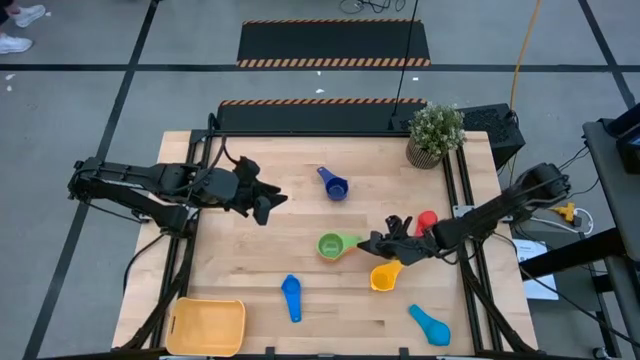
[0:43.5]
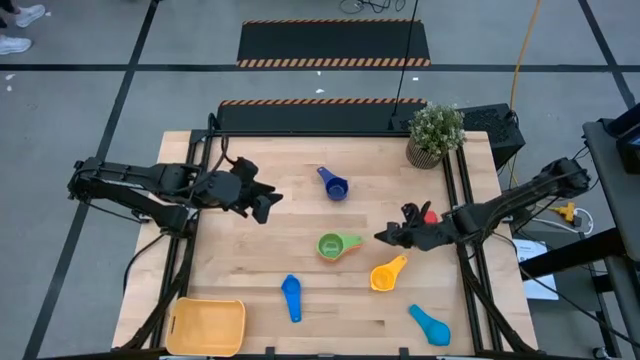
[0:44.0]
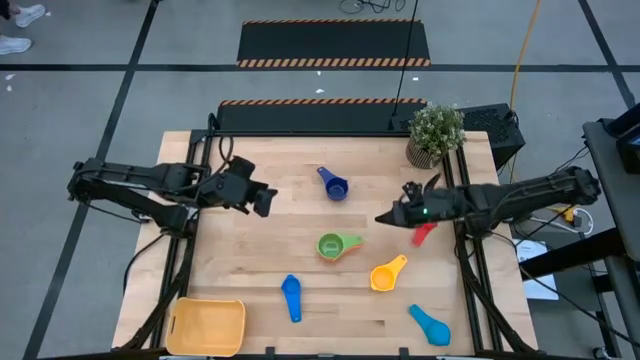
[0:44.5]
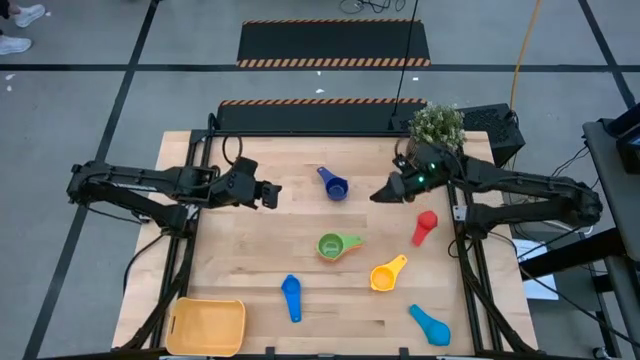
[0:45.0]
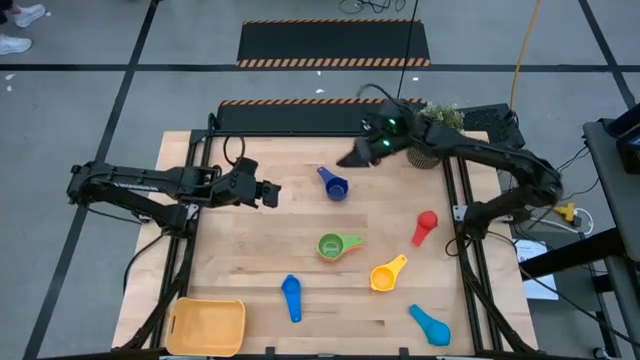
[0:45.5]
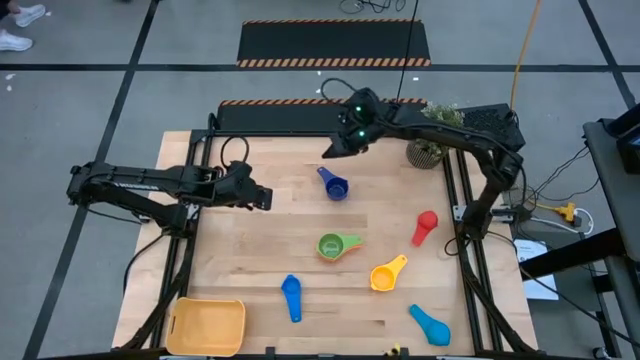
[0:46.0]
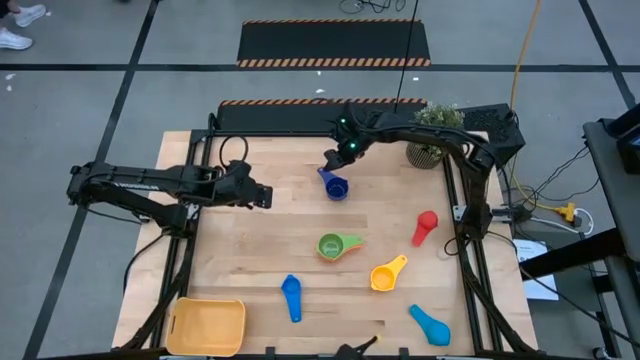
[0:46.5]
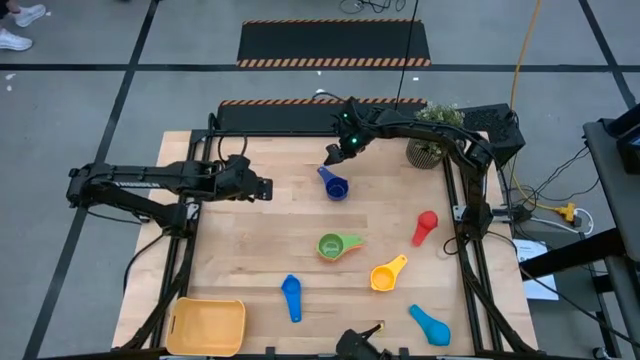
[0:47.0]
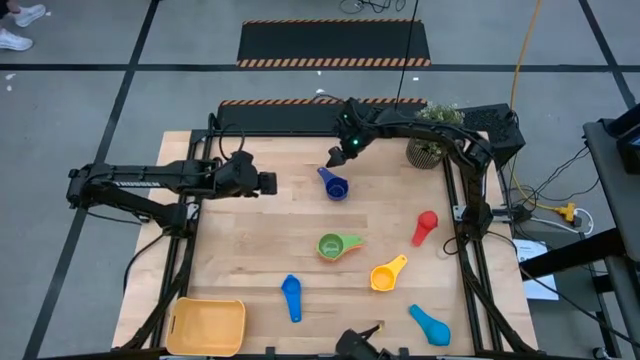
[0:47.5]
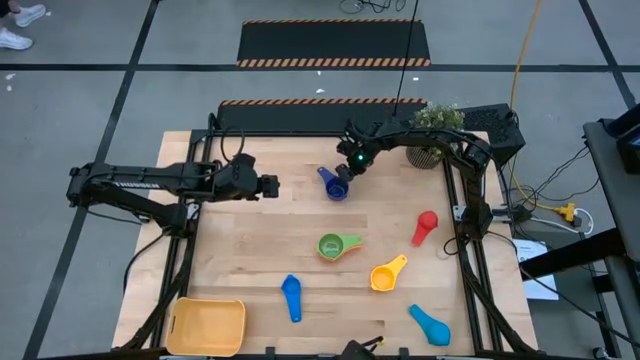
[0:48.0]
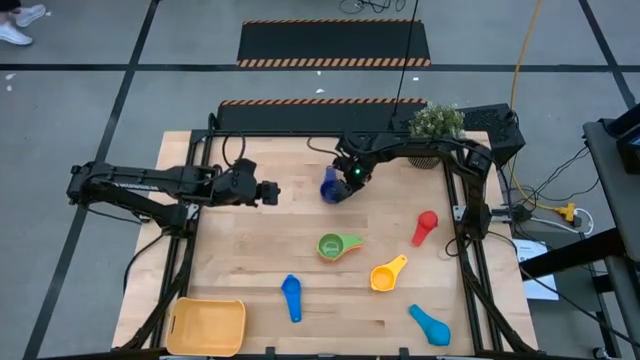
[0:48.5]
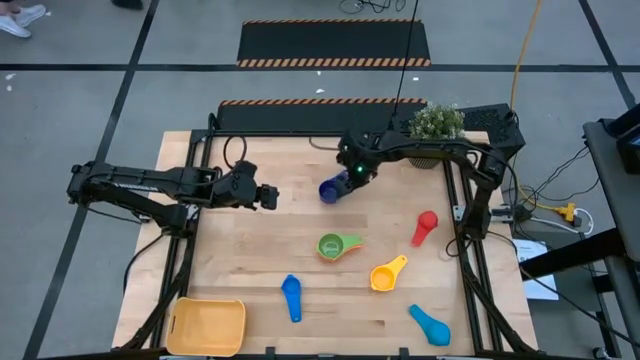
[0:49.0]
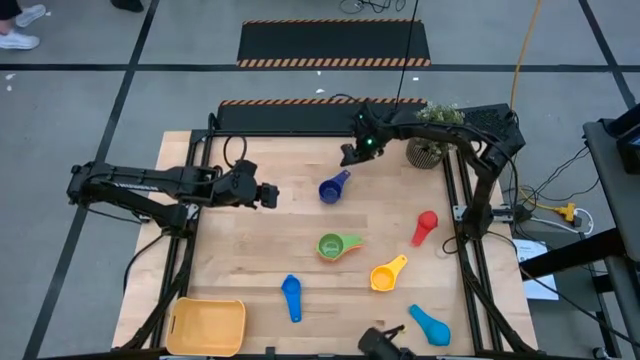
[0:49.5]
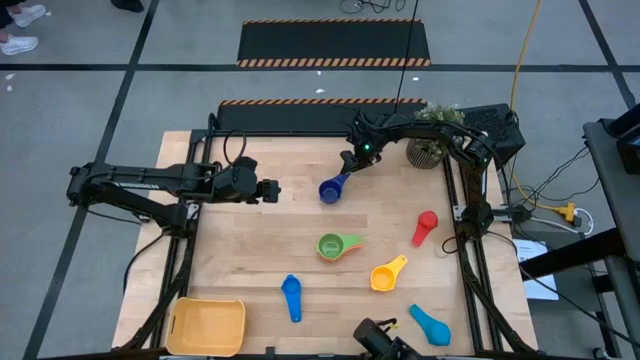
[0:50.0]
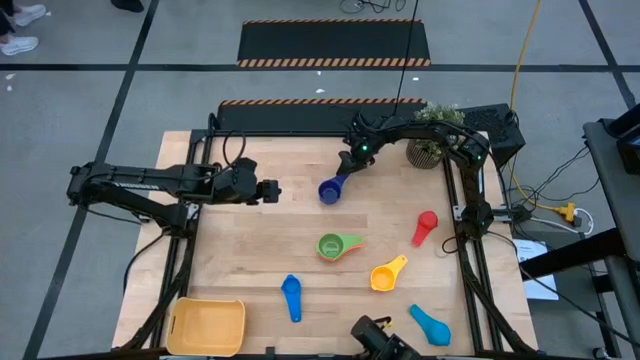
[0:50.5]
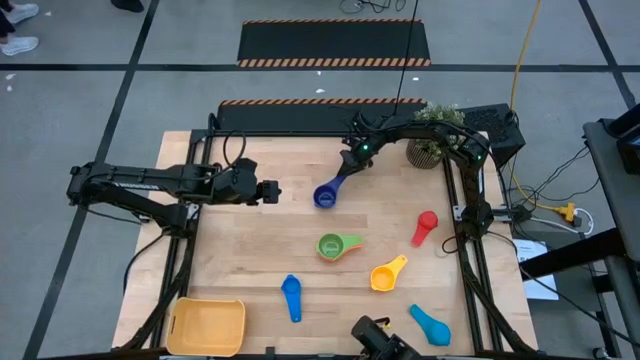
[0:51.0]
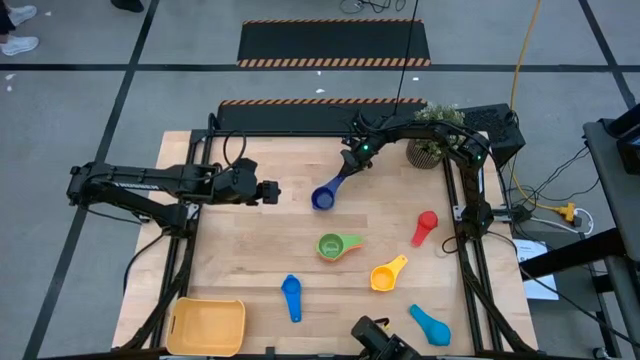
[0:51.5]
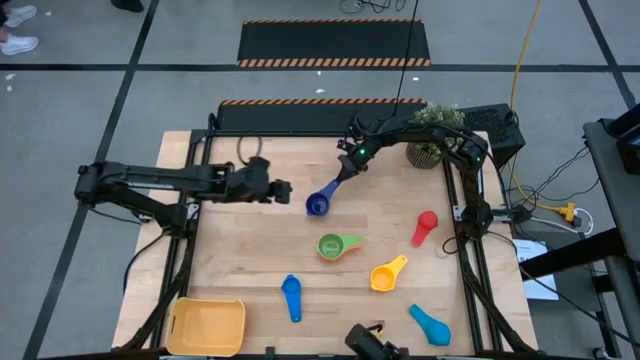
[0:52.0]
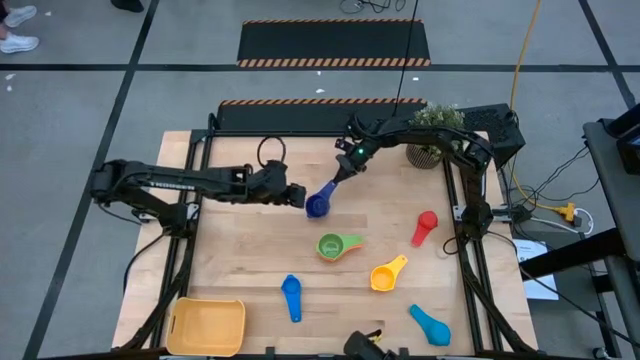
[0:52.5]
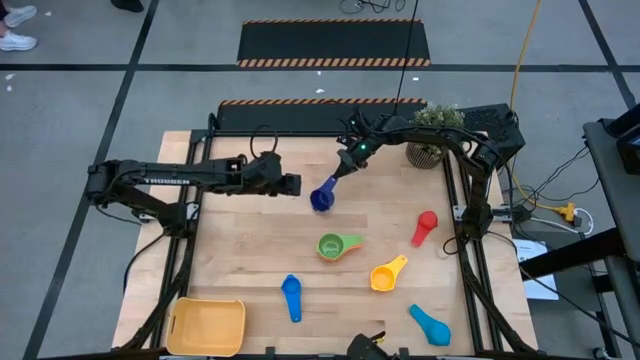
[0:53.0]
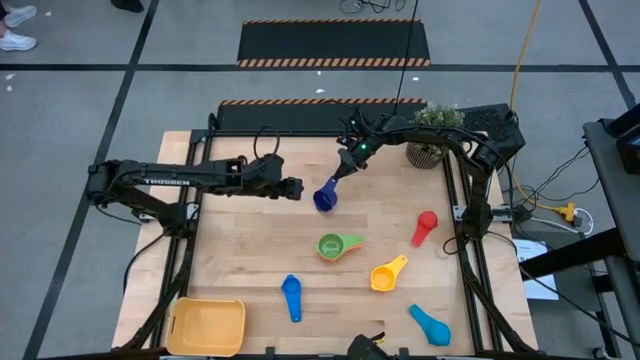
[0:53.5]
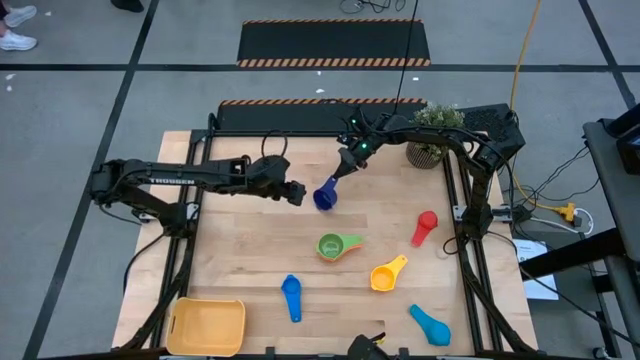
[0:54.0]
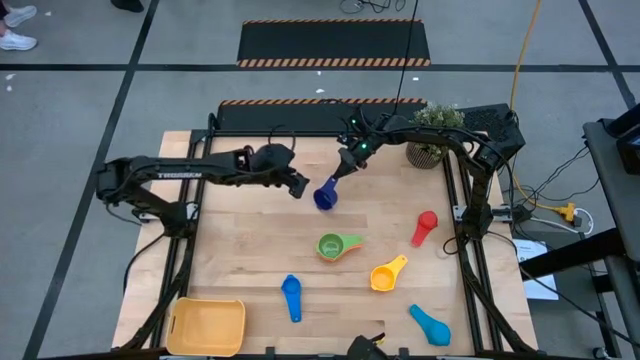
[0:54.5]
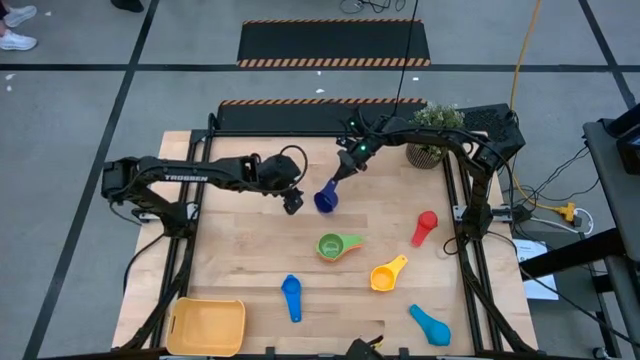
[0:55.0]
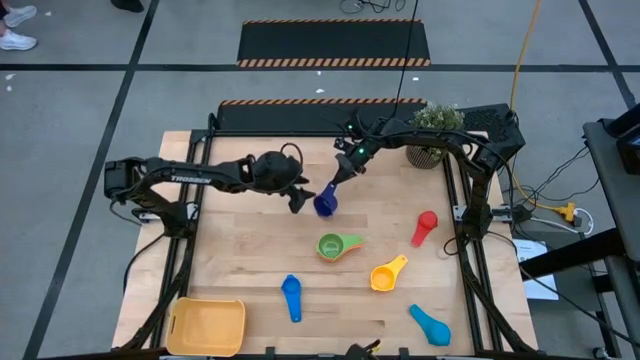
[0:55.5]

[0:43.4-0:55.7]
Task: Nest measuring cups in basket
Stack the dark blue measuring cup on top of the green measuring cup

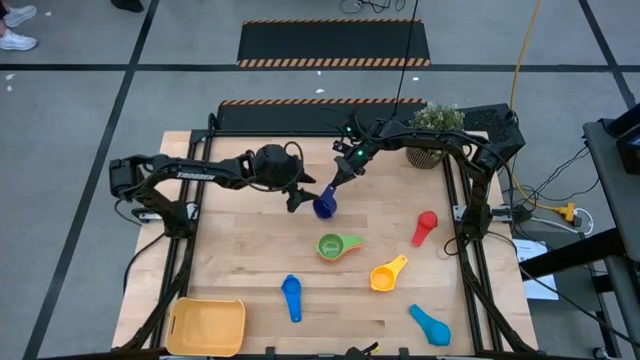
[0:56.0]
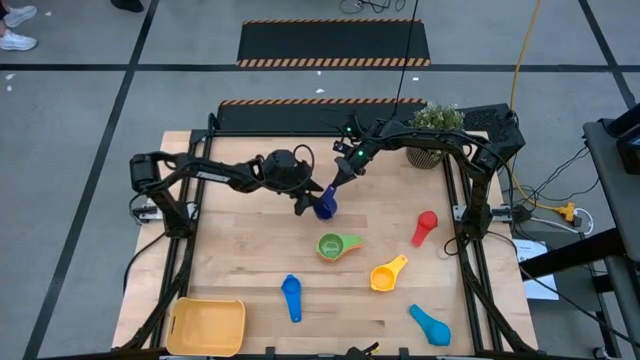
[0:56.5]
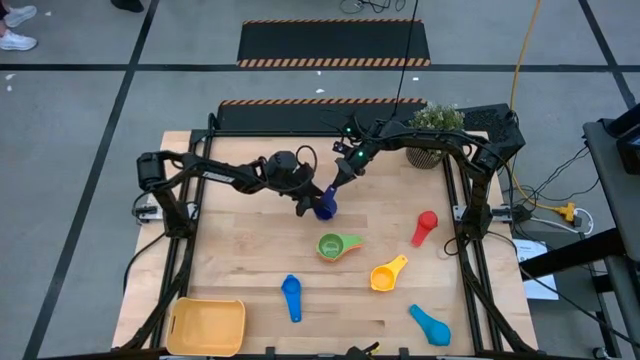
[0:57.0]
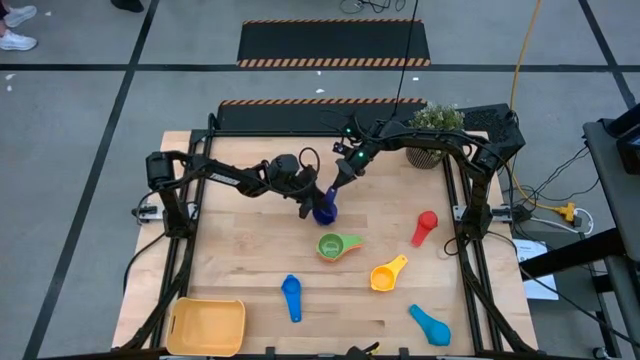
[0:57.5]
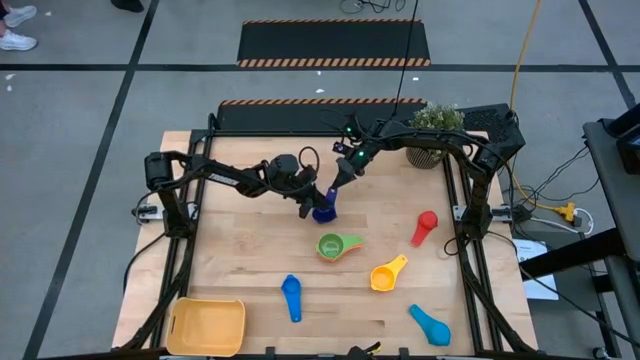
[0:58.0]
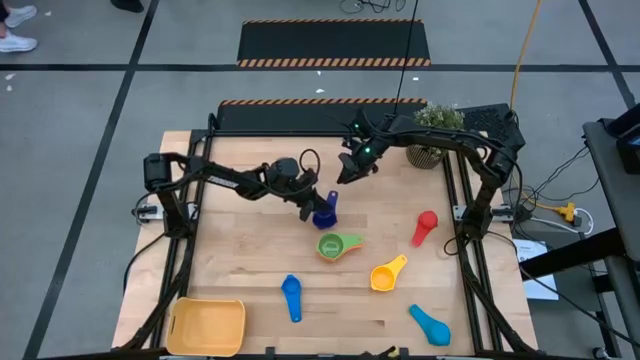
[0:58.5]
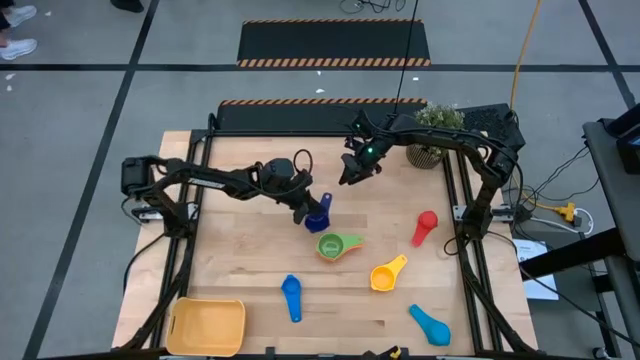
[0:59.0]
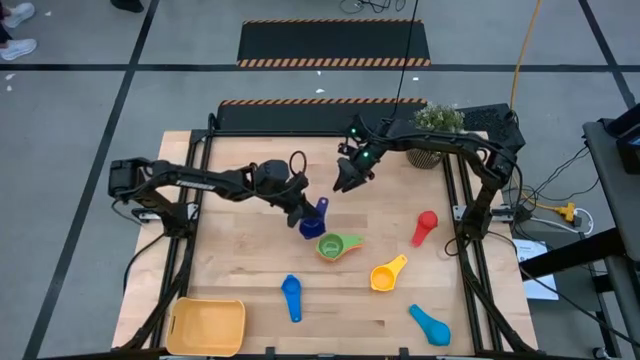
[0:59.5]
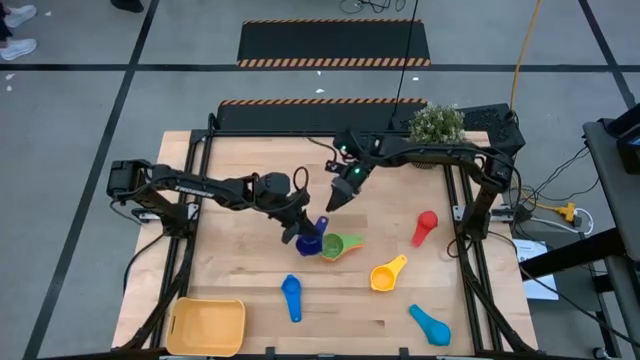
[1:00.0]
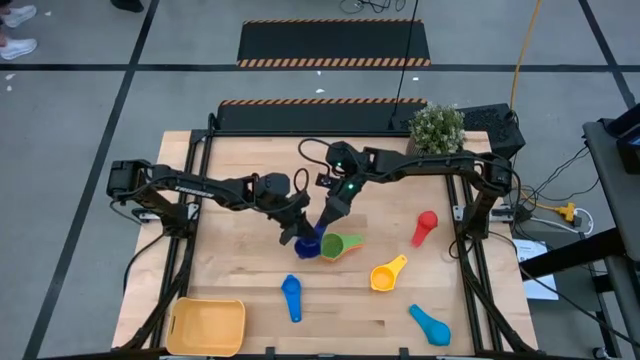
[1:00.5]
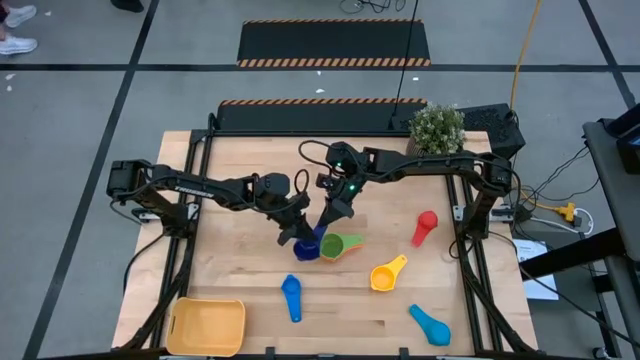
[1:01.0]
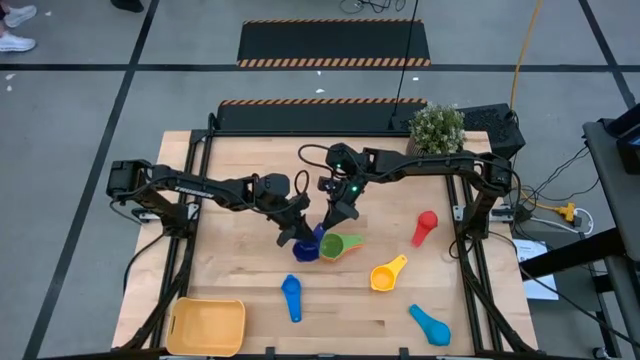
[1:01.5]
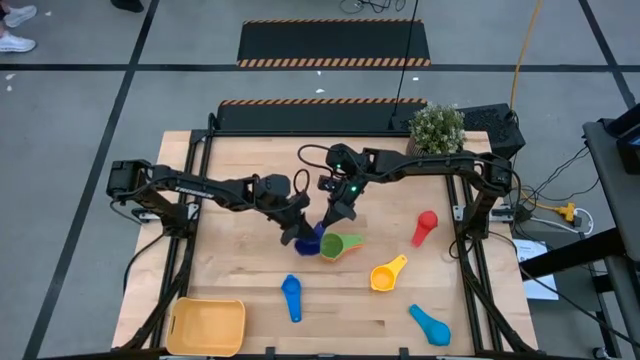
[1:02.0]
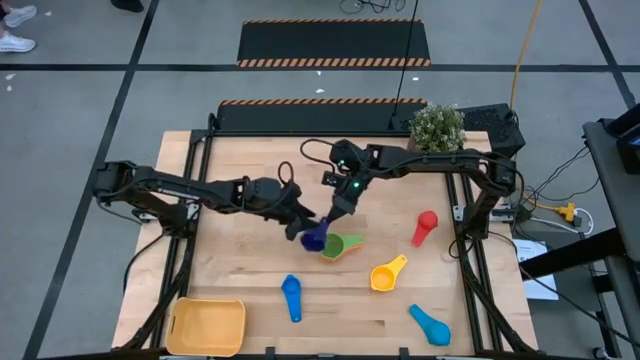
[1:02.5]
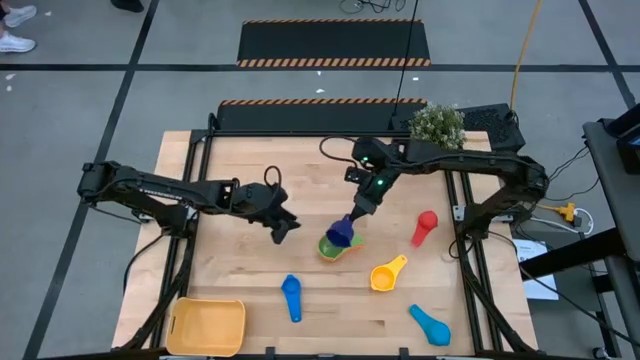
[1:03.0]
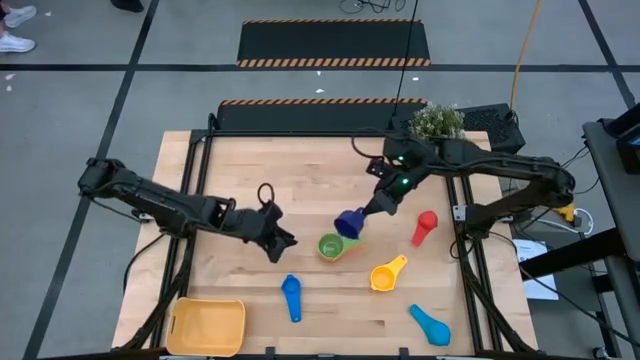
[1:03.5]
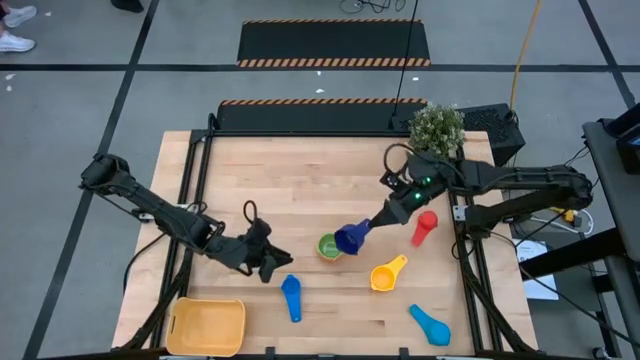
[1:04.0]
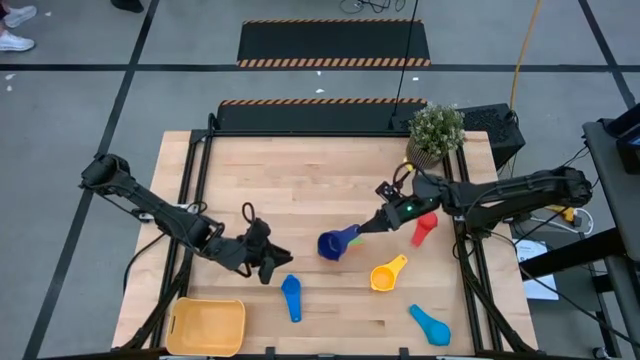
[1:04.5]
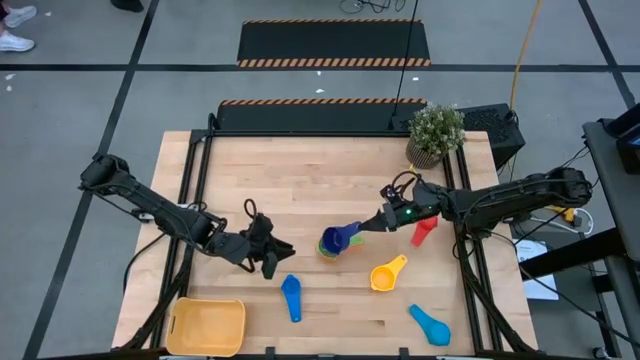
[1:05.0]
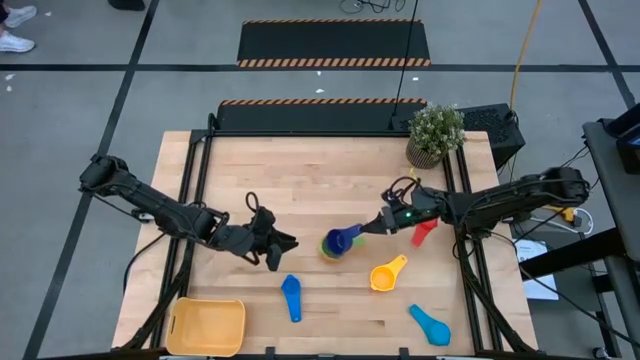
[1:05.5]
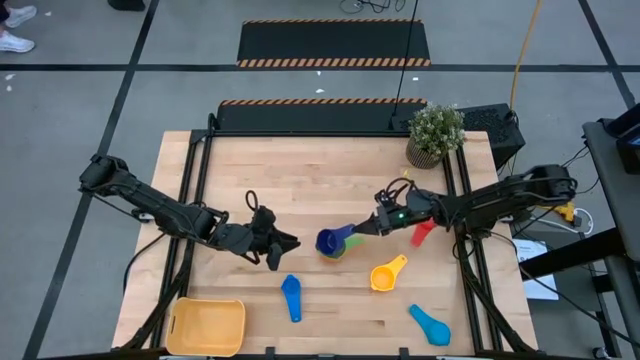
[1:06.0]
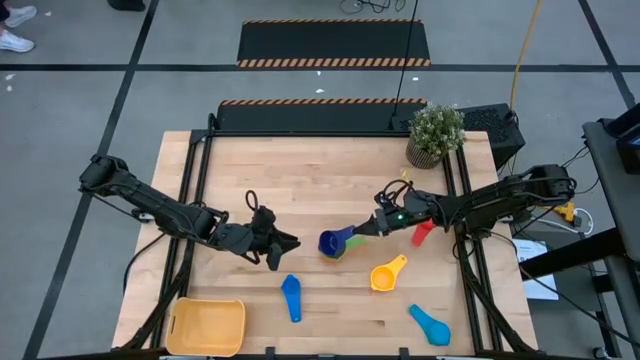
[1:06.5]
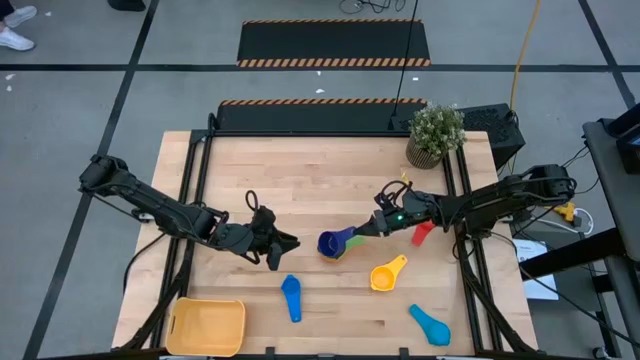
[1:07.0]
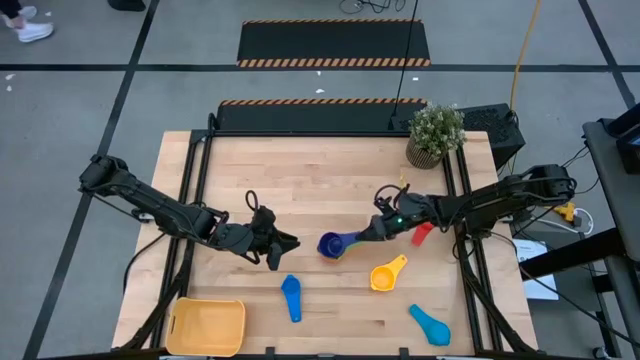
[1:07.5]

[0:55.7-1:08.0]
Stack the dark blue measuring cup on top of the green measuring cup
